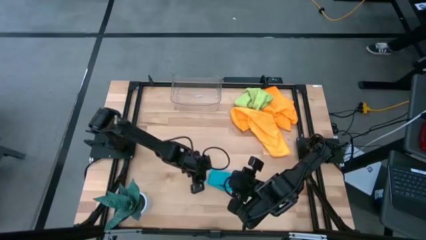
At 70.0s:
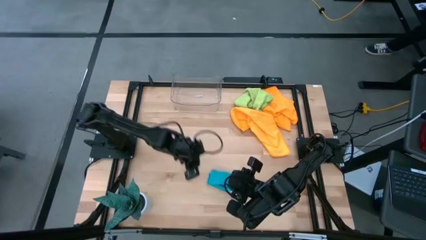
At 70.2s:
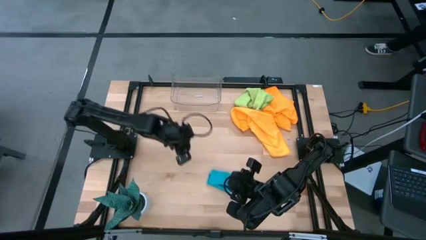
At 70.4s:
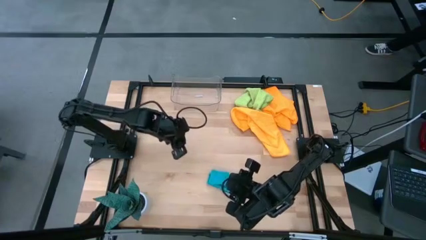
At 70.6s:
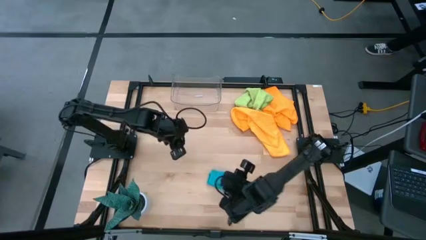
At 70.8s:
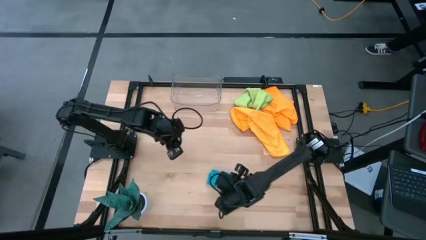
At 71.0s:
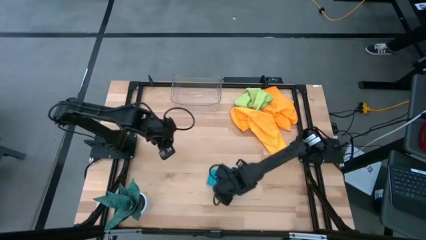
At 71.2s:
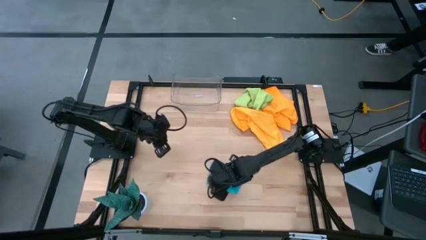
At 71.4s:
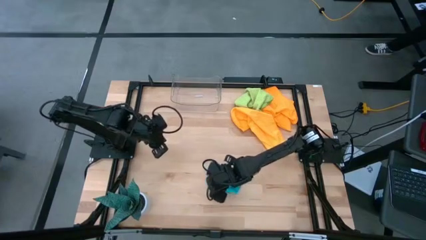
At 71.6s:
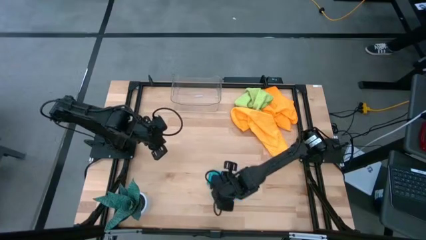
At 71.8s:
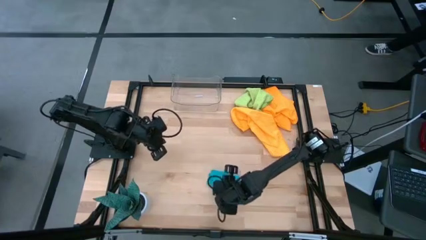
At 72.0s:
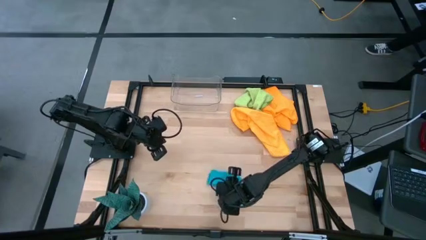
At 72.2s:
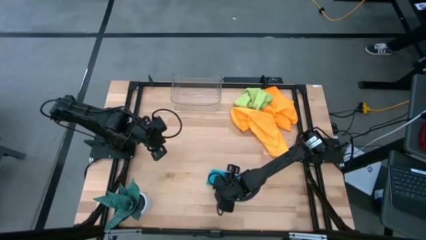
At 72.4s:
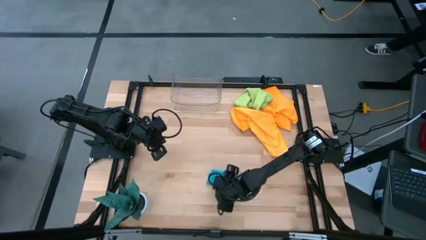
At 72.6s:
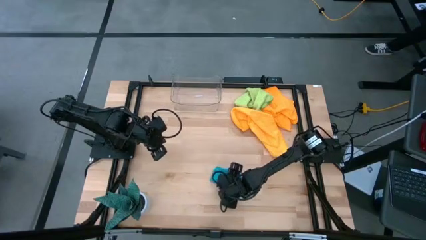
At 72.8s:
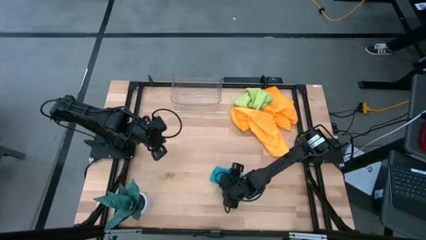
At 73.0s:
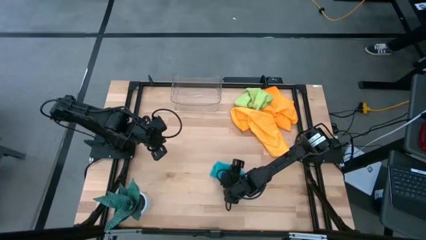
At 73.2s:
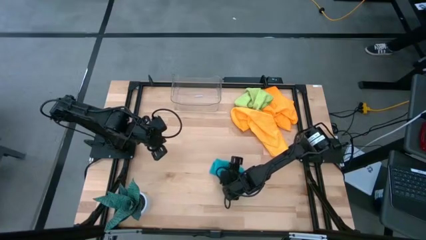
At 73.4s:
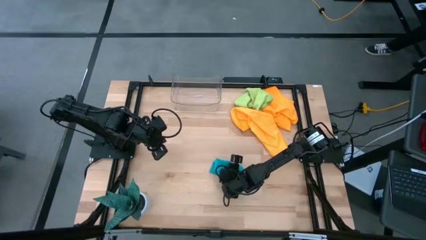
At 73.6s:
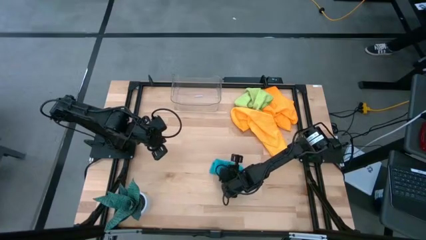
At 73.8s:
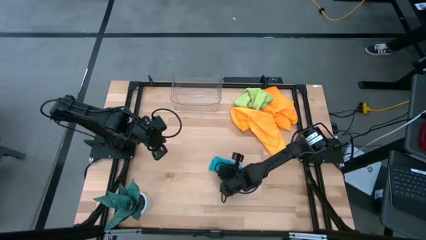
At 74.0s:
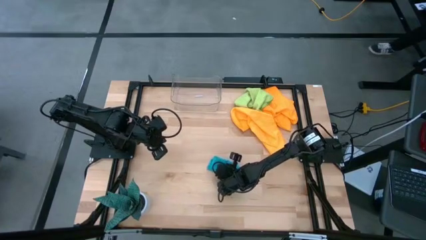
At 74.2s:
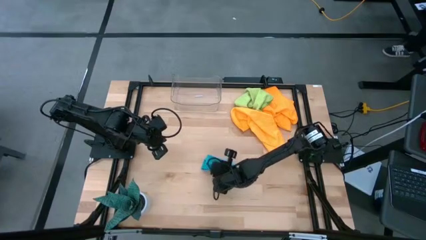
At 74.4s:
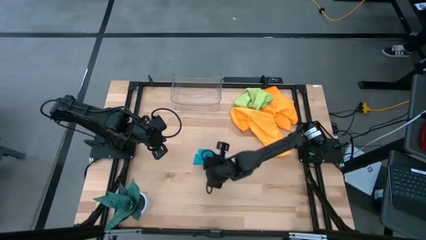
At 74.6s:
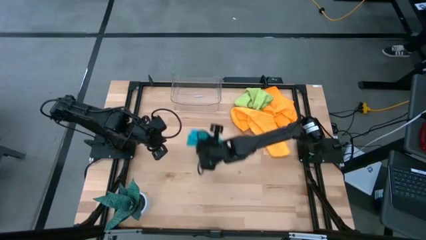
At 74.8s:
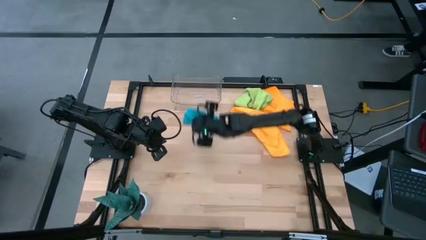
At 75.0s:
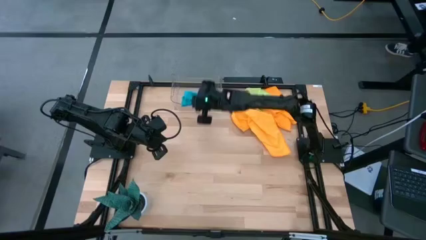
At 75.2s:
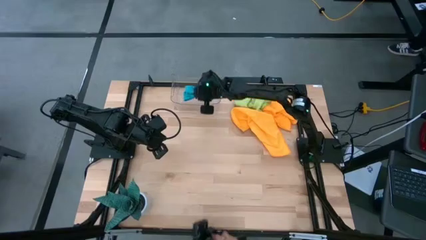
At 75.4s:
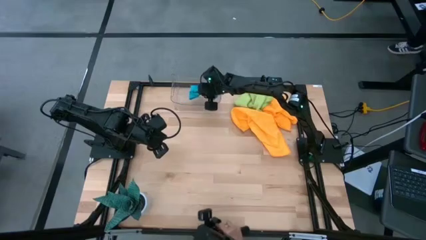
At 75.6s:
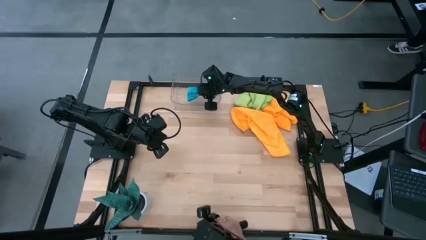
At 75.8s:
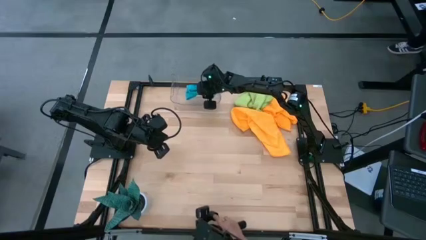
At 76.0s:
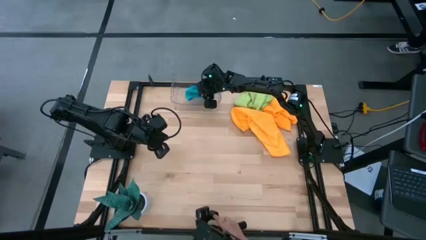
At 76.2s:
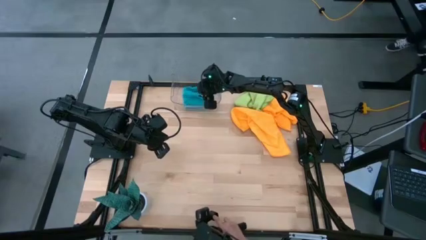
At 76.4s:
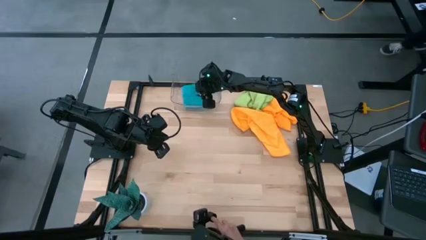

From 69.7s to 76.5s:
Task: Fold microfiber towels
Put the folded blue microfiber cloth into the transparent bin

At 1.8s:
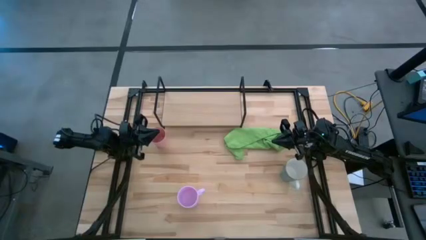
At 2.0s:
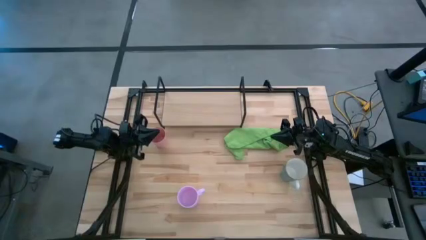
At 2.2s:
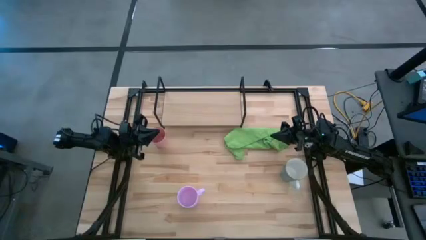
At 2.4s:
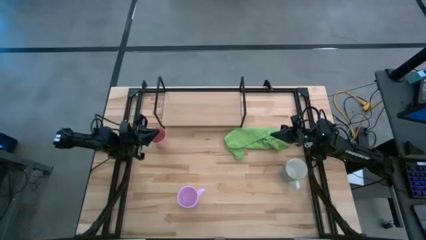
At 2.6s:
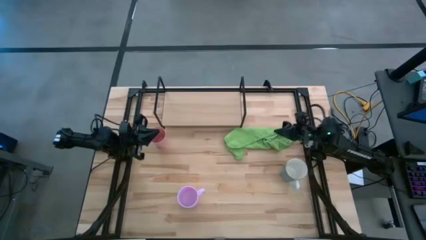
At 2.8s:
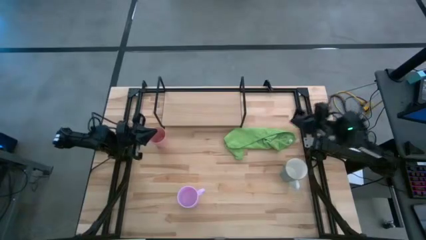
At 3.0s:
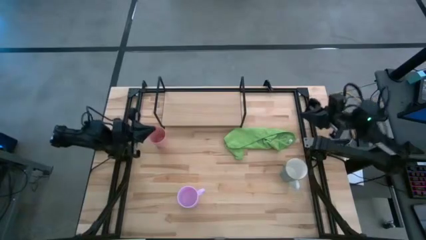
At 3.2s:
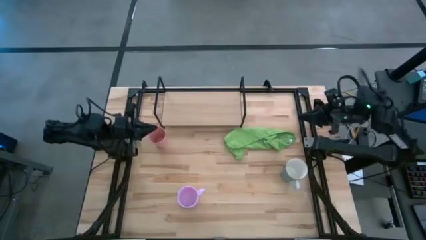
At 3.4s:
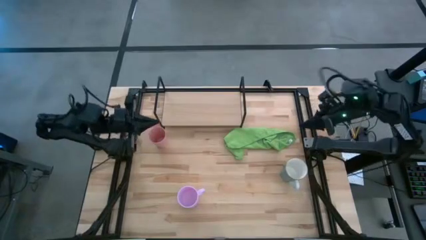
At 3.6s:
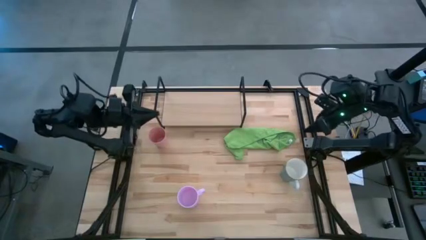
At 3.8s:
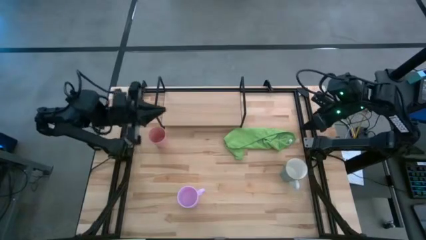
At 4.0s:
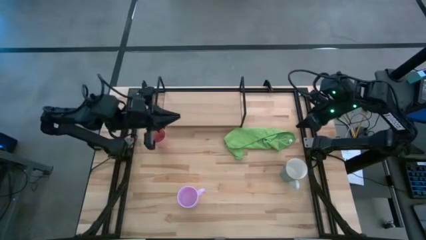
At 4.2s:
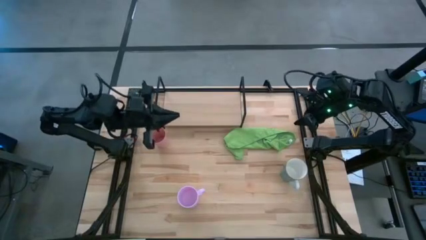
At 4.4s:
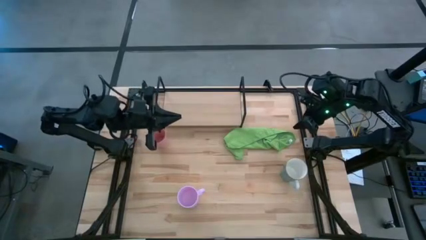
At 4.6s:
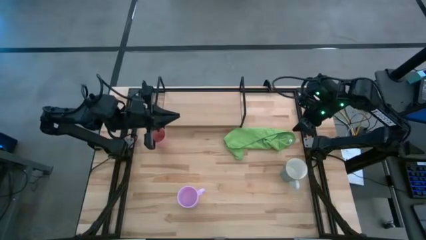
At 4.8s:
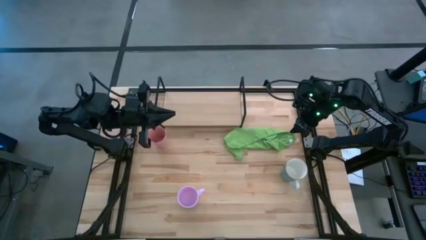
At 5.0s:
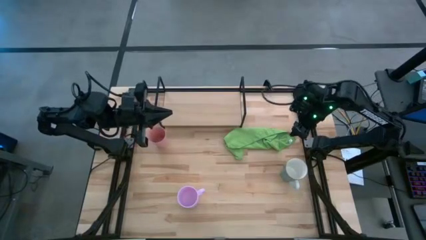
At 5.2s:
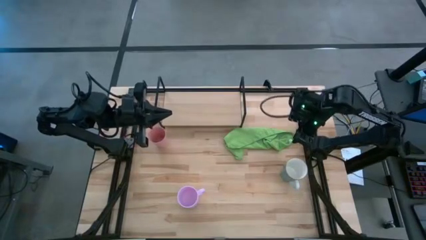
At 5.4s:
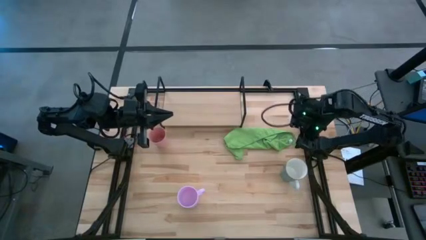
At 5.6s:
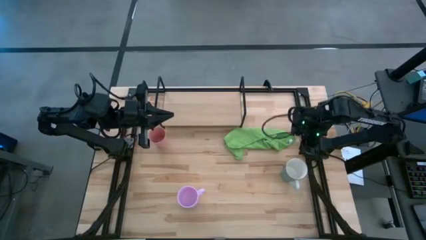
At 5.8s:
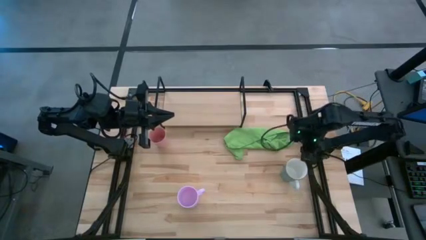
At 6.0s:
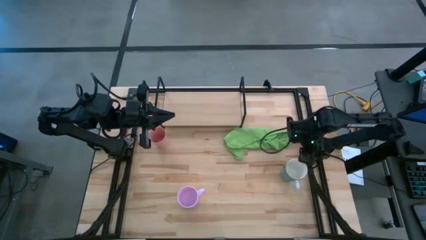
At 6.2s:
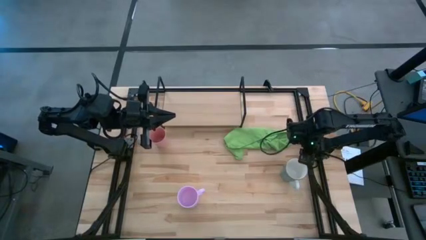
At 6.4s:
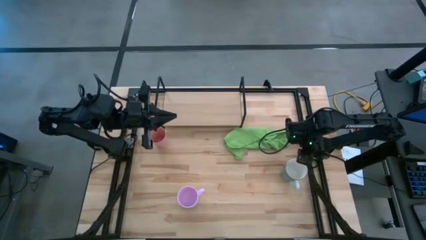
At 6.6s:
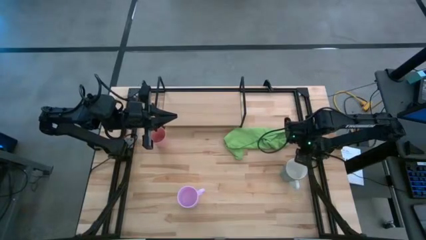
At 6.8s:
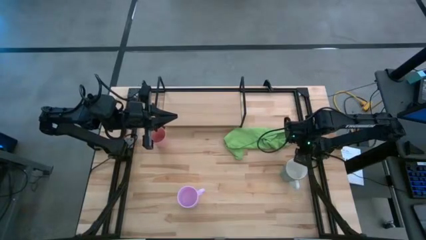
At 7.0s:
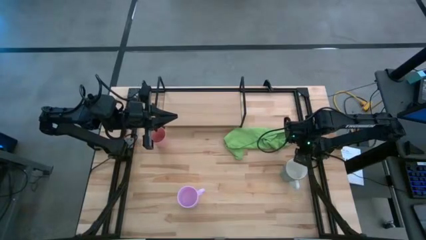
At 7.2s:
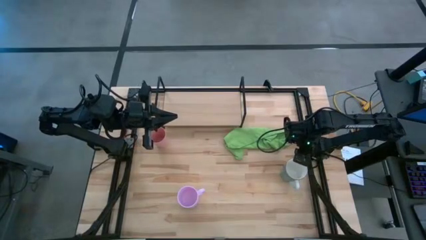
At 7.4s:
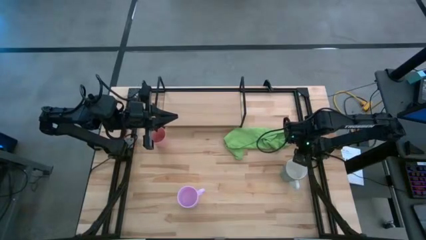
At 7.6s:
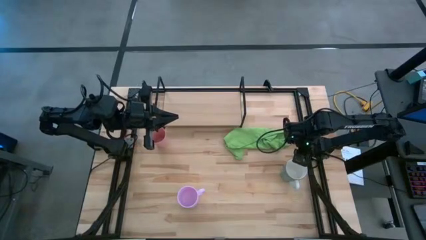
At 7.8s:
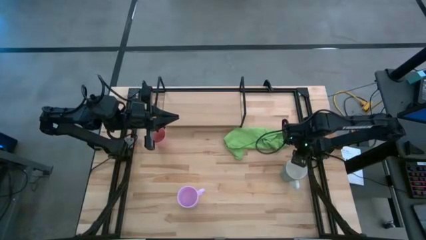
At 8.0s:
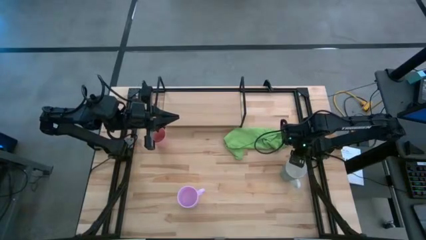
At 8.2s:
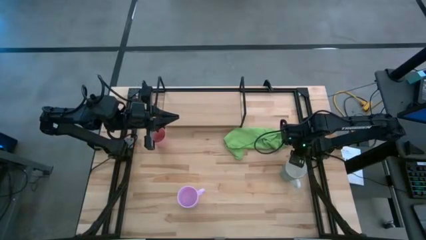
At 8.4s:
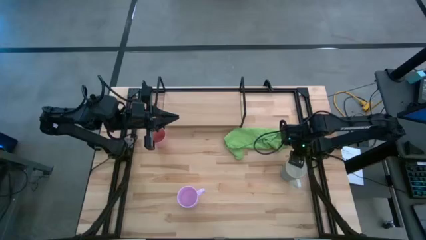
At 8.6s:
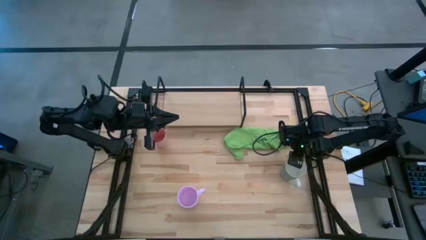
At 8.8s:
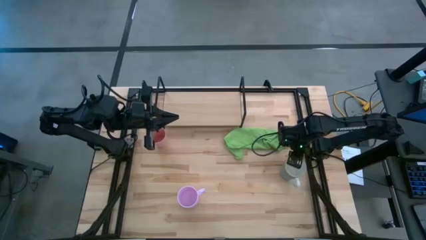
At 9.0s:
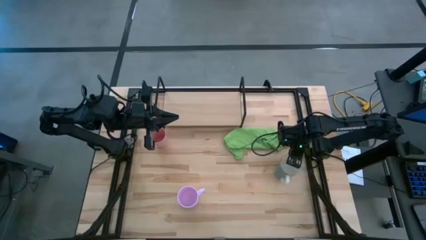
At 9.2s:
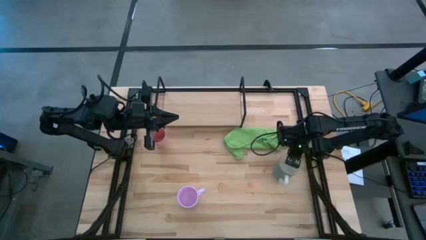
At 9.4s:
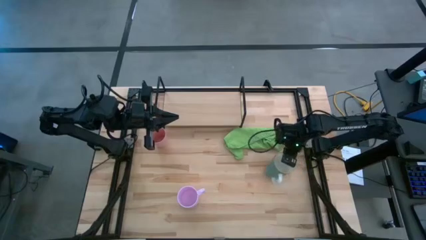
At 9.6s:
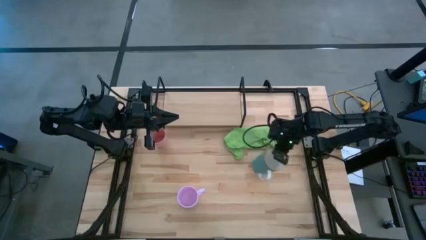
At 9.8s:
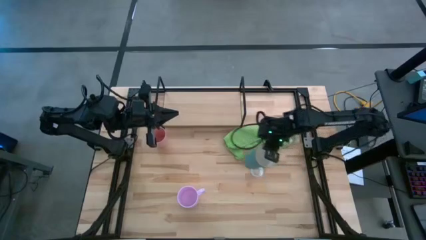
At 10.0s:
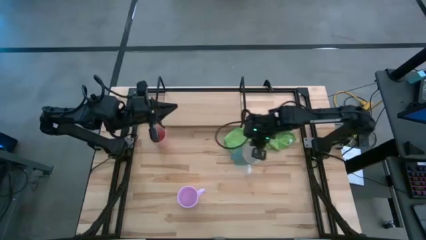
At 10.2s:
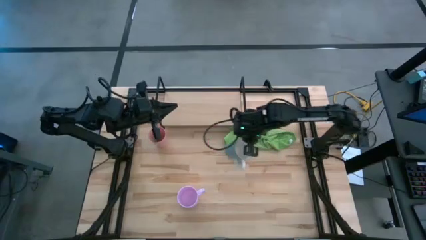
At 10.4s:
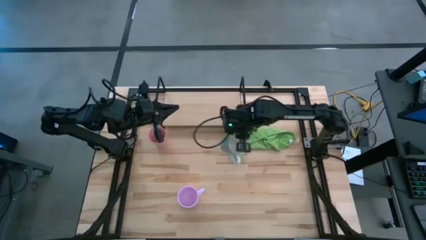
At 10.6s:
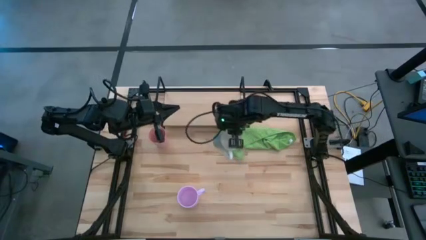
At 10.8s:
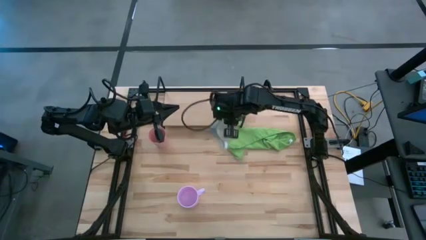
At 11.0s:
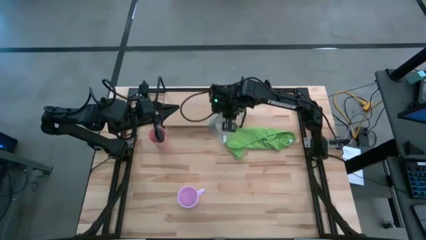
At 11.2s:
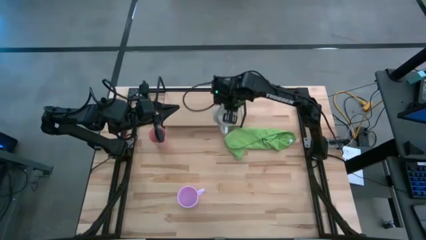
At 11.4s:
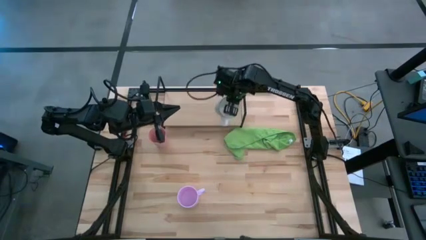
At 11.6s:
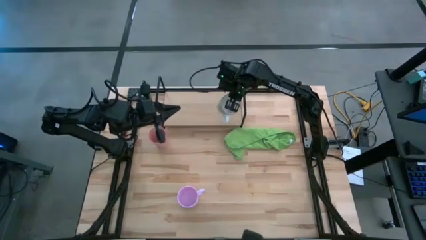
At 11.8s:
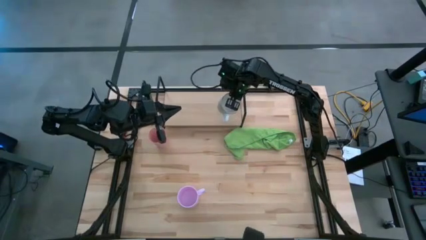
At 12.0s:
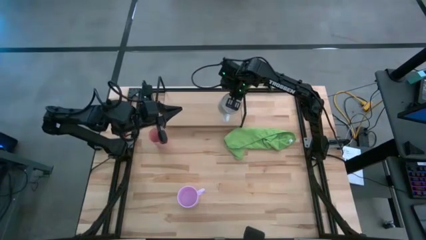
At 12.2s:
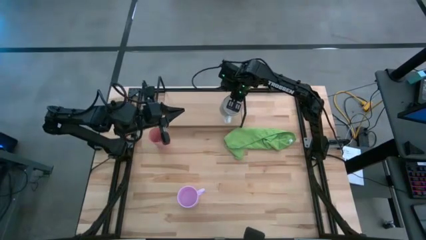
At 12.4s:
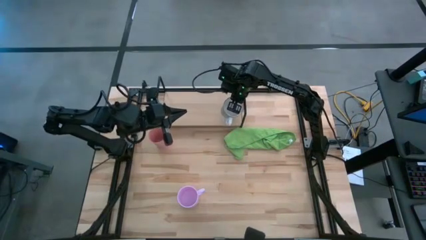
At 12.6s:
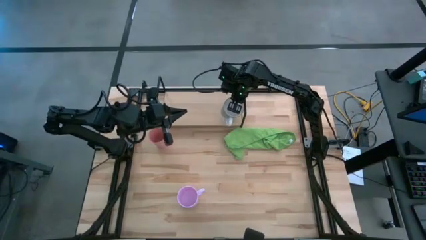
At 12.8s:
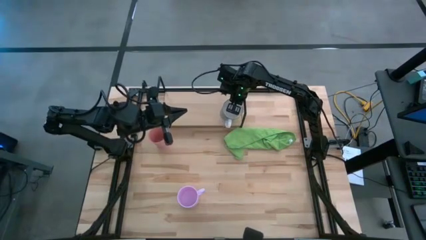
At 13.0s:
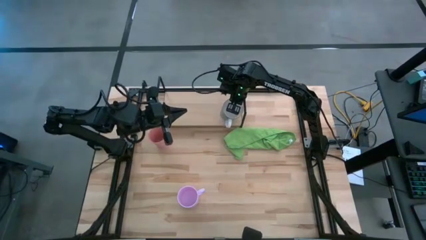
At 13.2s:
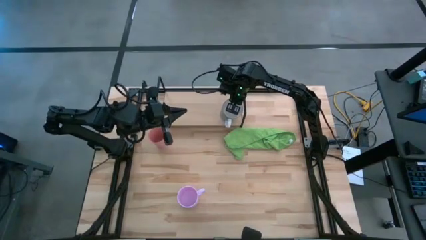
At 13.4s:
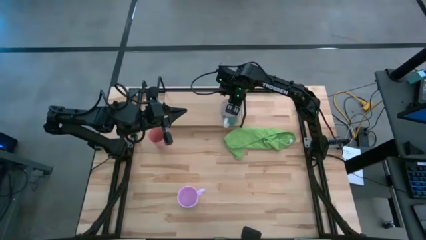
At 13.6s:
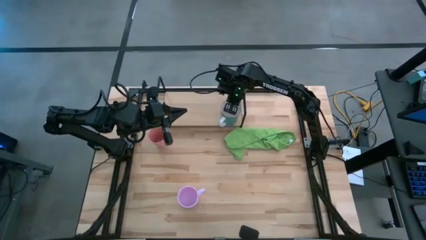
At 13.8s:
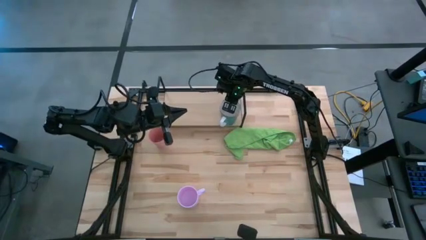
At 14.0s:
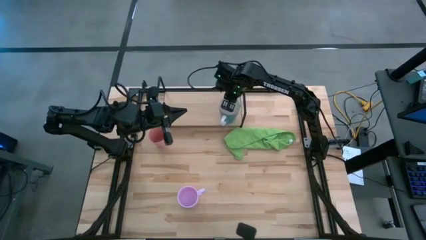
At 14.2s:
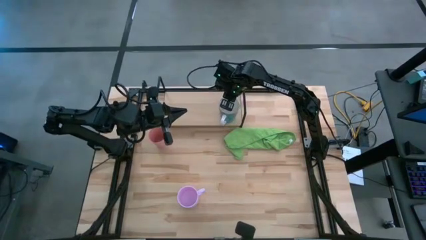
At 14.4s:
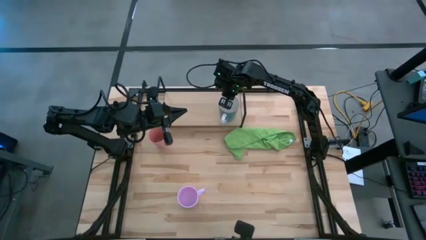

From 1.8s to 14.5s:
Task: Stack small to large cups/mugs on shelf
Put the blue mug on the shelf
